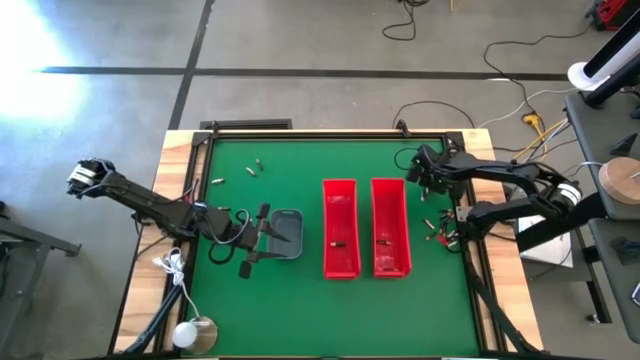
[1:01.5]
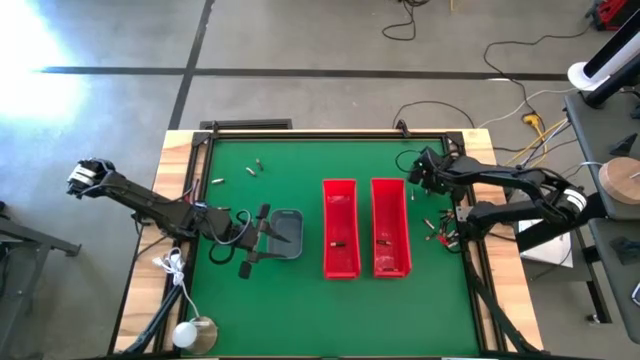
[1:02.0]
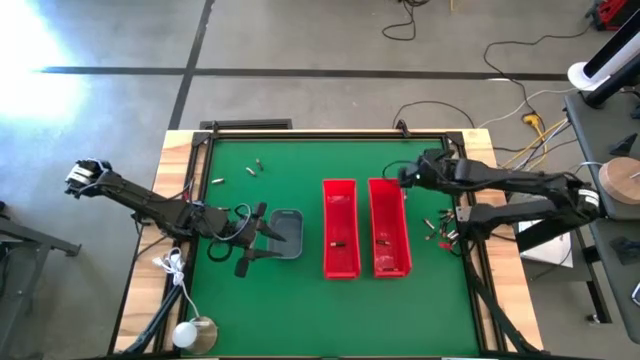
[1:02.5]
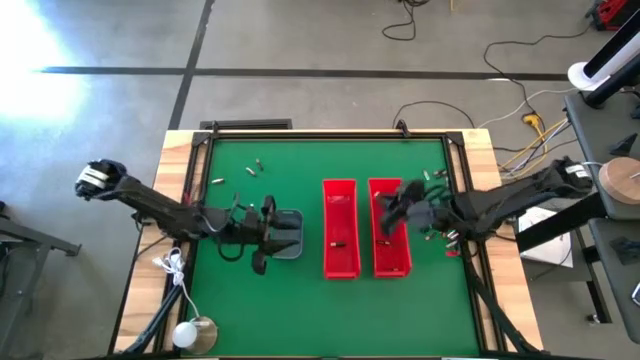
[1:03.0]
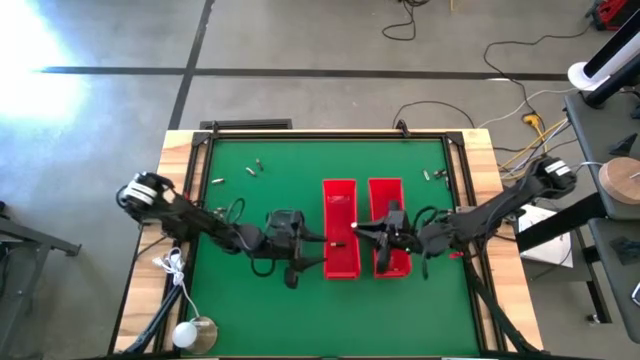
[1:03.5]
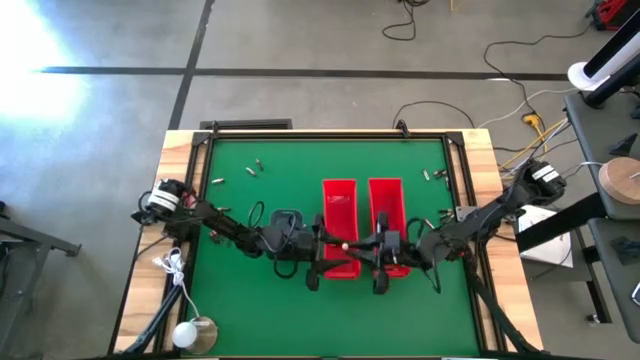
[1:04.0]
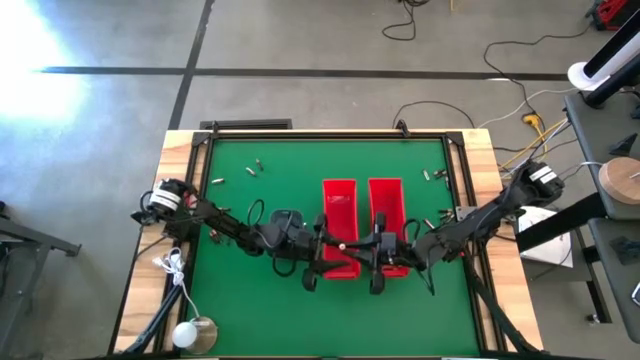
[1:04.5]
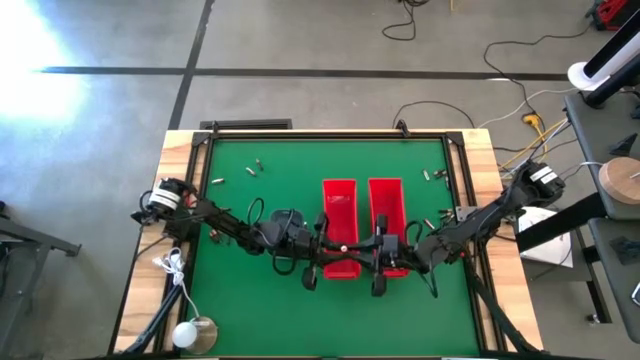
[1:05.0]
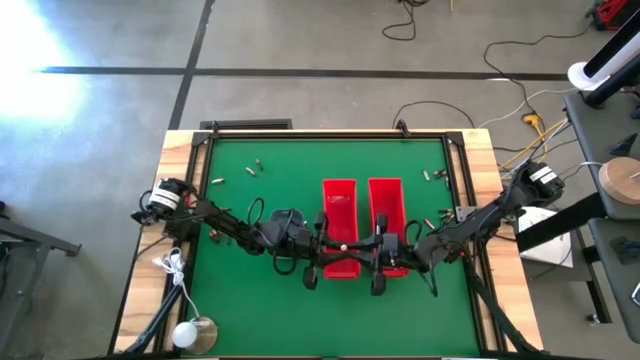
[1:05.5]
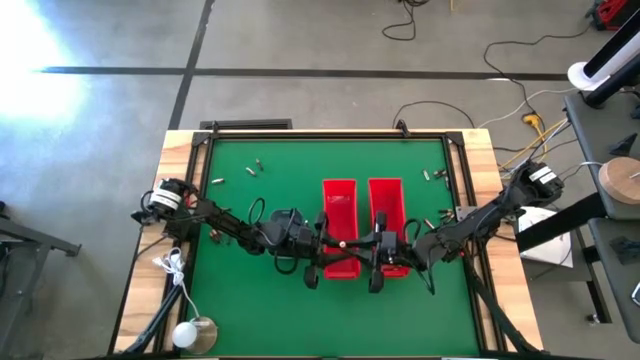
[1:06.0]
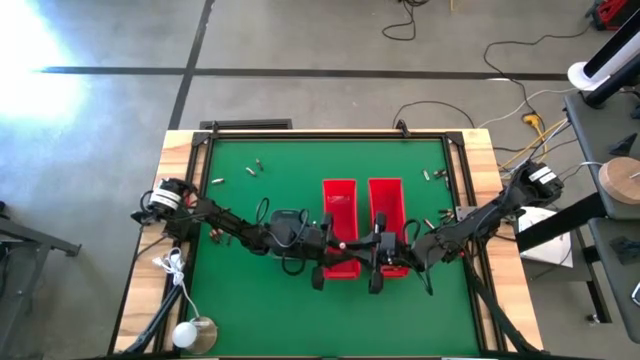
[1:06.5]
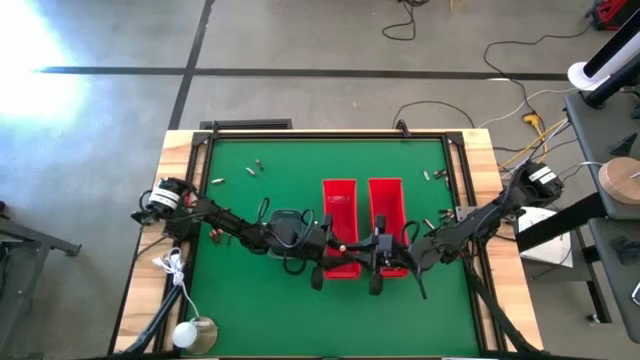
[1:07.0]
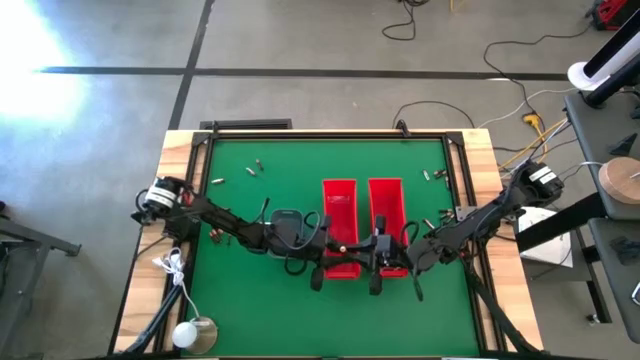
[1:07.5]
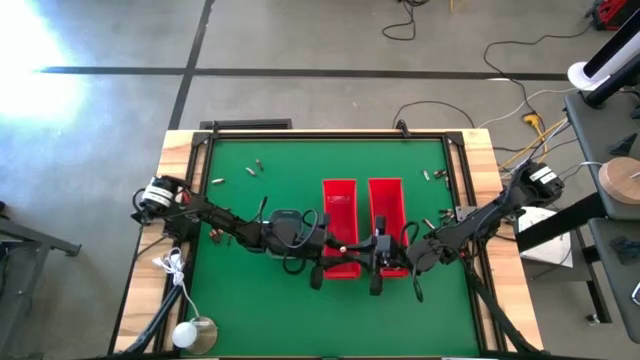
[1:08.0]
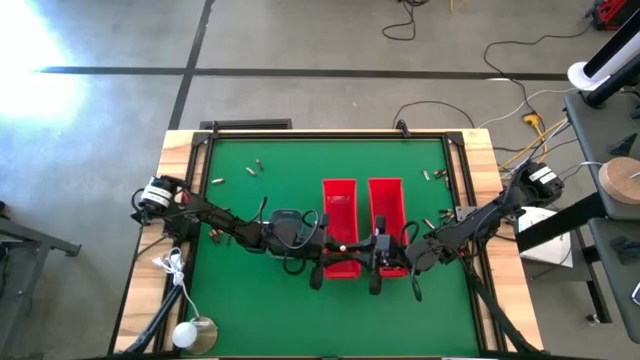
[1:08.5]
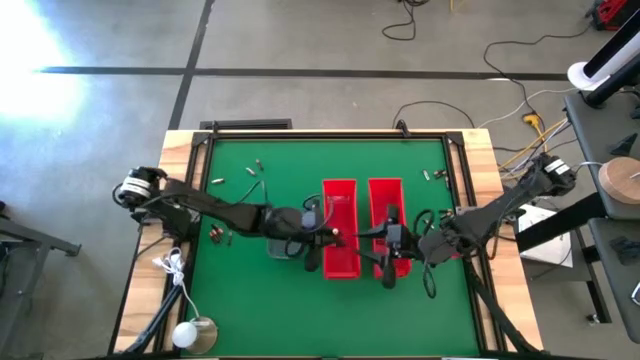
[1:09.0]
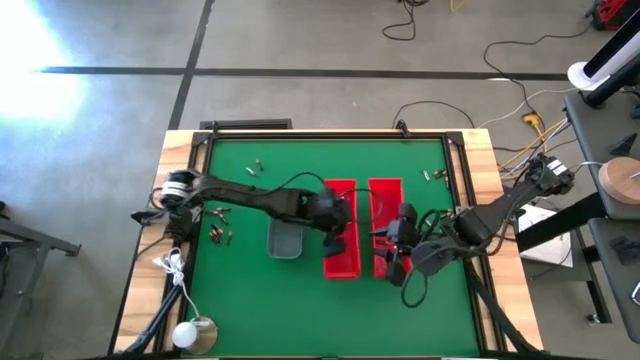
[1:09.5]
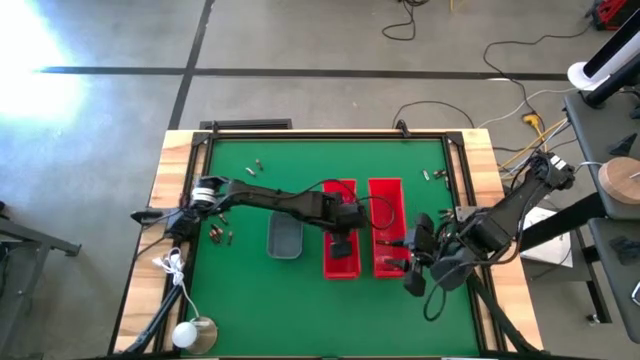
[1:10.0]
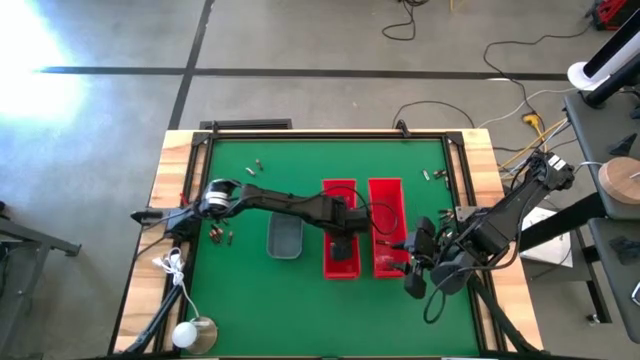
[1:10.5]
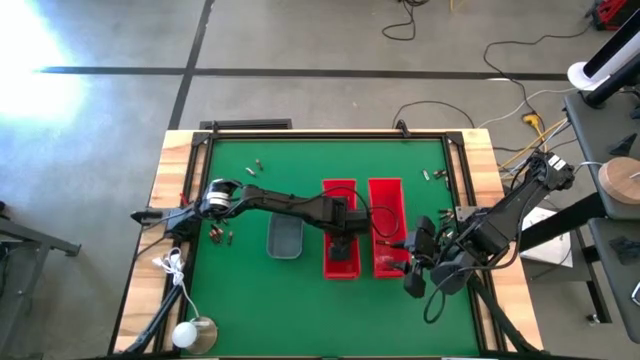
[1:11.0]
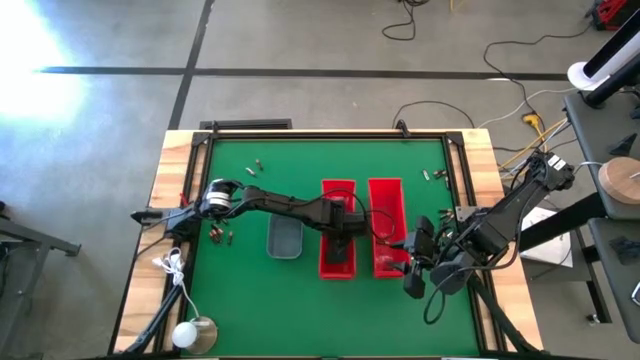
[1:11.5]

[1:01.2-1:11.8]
Task: Sort batteries
Put the big black battery into the left red bin

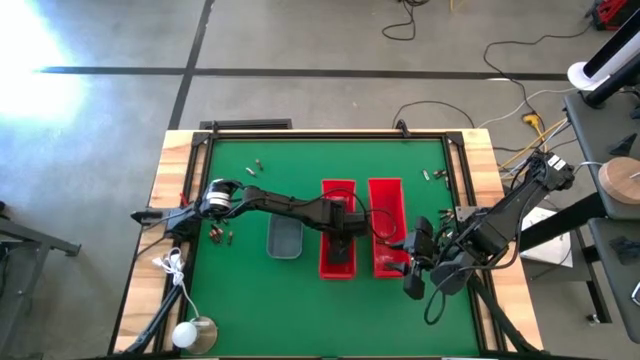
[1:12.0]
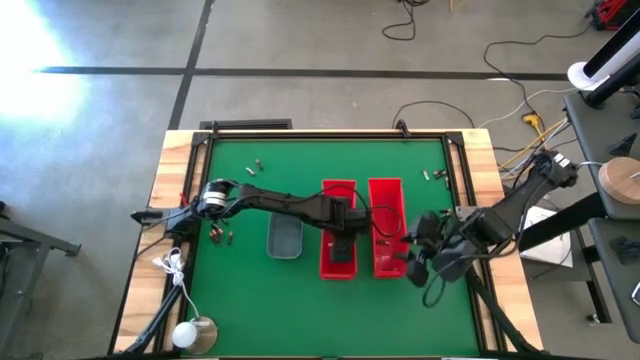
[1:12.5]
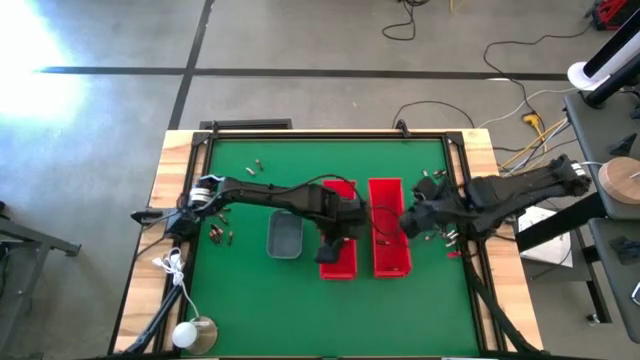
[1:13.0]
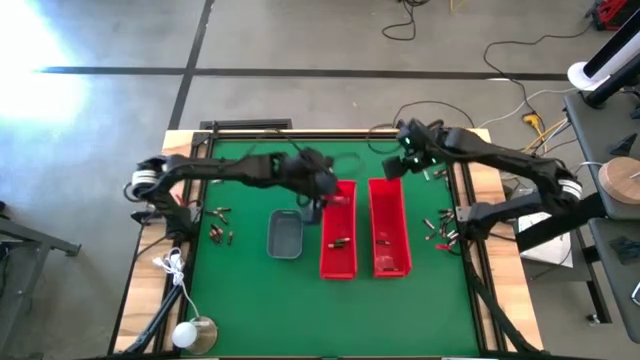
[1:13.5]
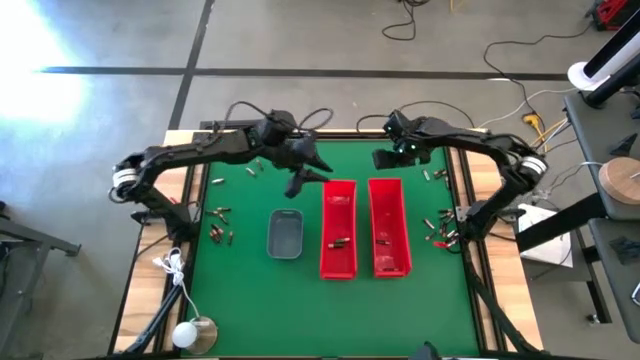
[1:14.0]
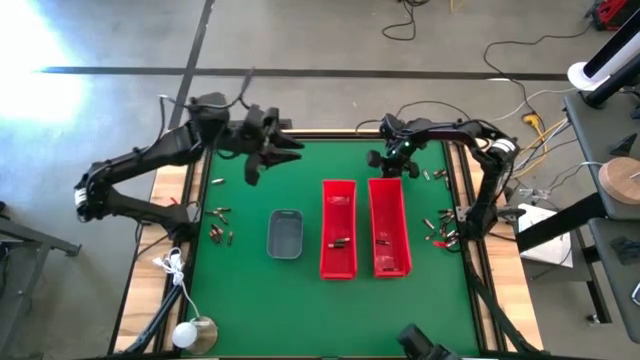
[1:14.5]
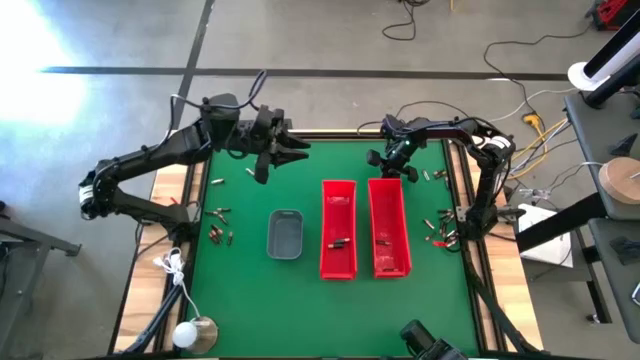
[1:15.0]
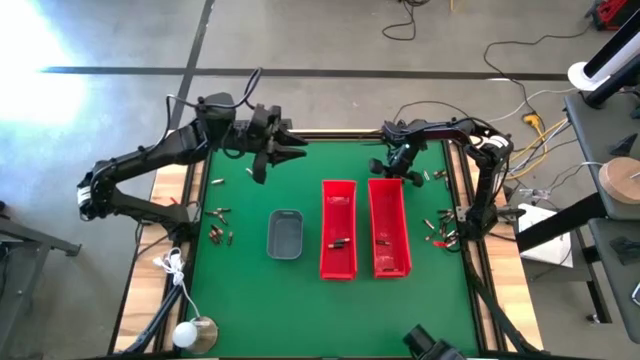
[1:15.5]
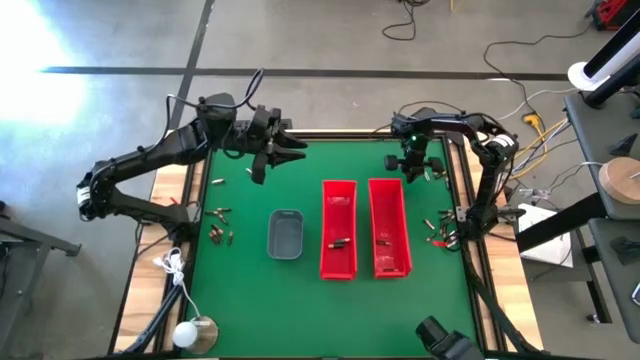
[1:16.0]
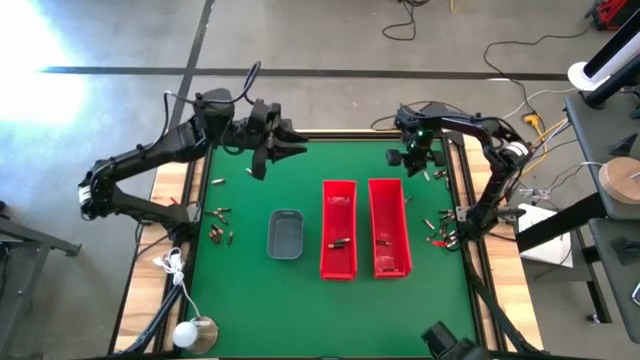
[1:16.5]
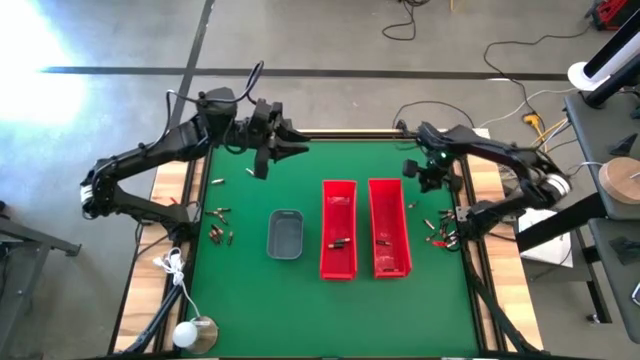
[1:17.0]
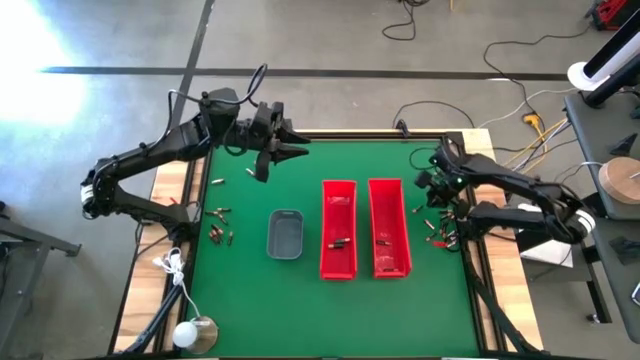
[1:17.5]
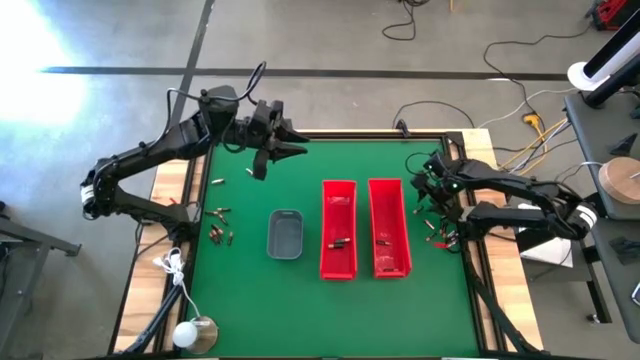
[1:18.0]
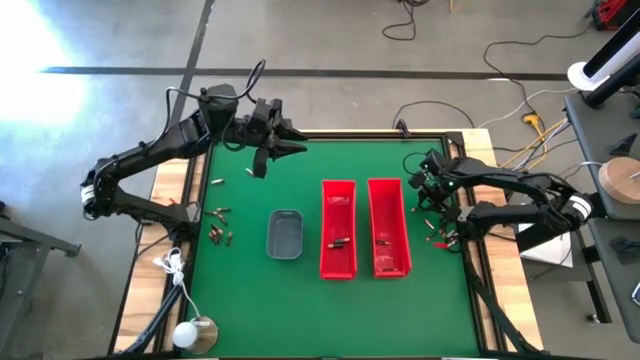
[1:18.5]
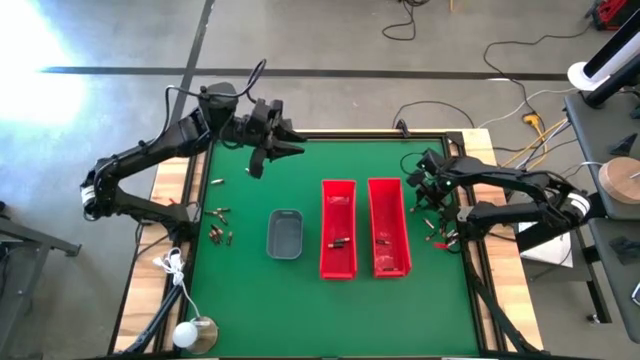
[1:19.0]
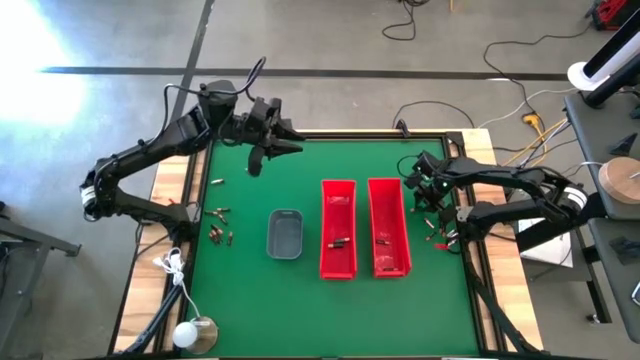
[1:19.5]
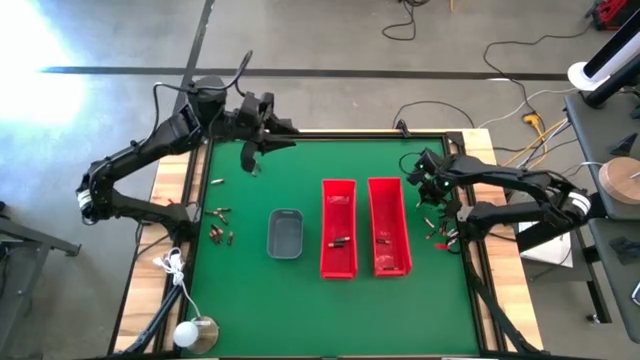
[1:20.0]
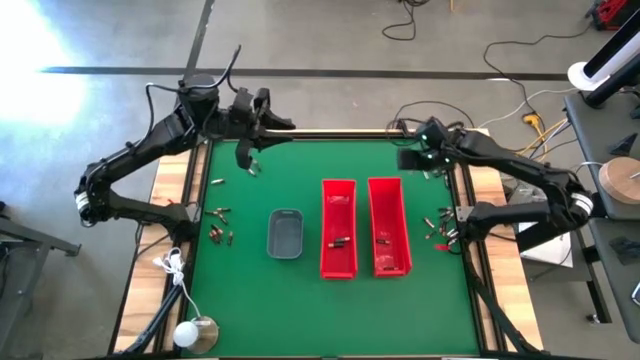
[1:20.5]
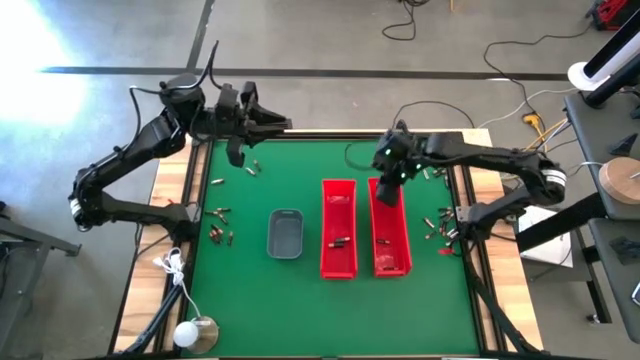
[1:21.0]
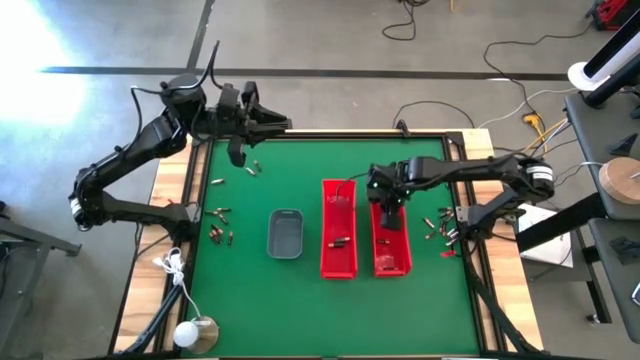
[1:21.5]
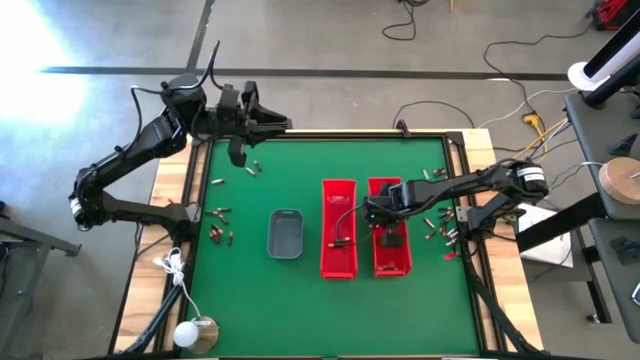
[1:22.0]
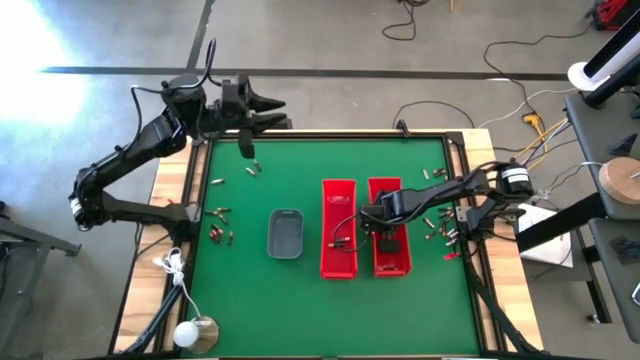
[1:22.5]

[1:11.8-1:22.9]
Put the small black battery into the right red bin
